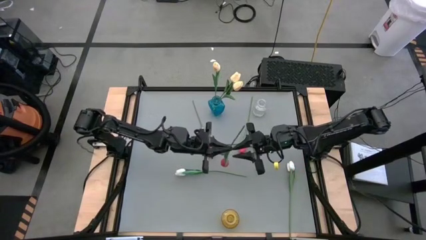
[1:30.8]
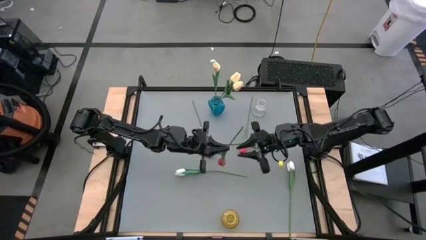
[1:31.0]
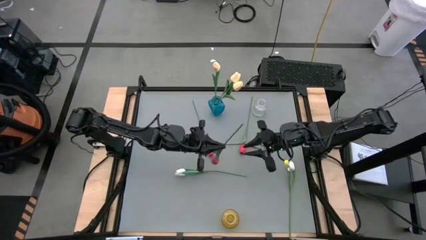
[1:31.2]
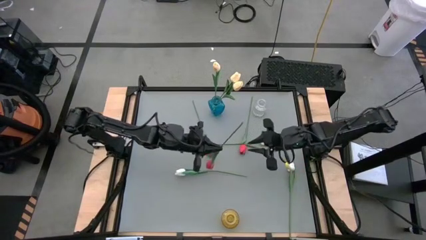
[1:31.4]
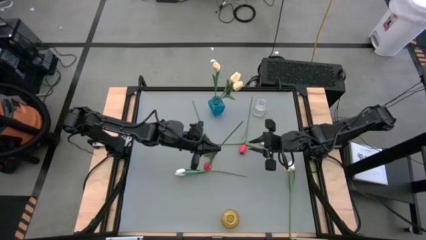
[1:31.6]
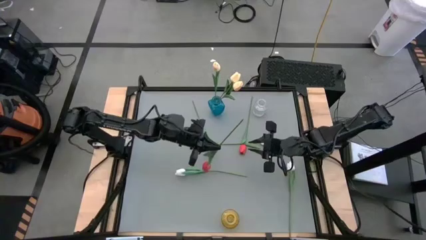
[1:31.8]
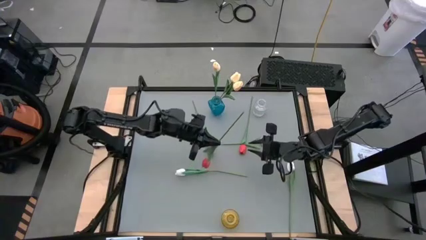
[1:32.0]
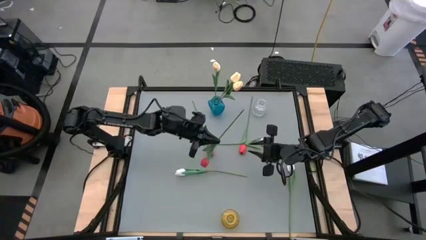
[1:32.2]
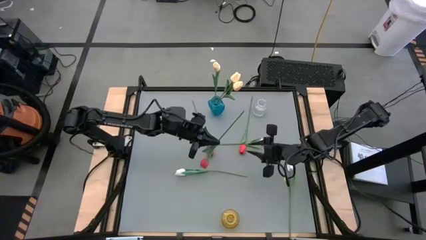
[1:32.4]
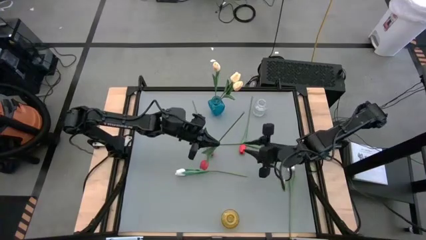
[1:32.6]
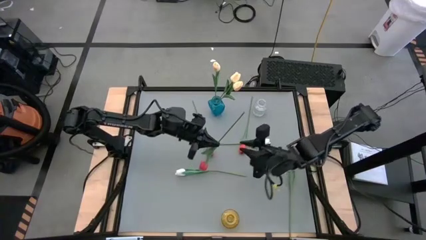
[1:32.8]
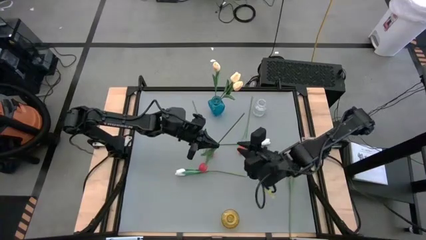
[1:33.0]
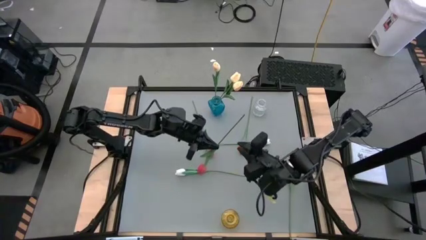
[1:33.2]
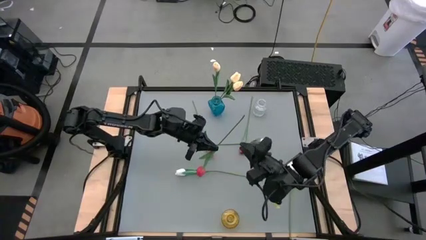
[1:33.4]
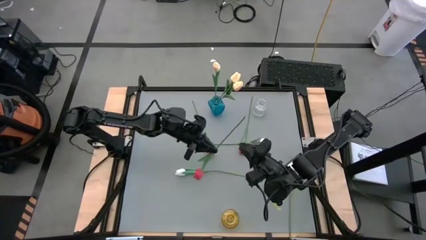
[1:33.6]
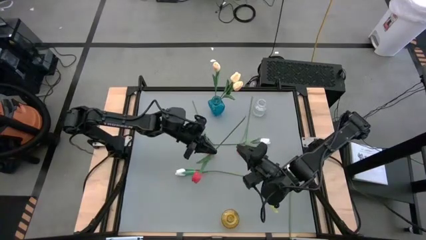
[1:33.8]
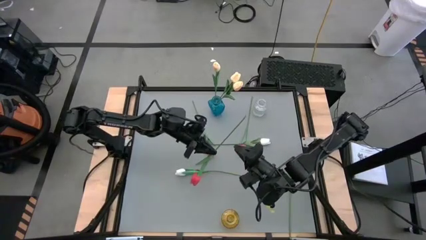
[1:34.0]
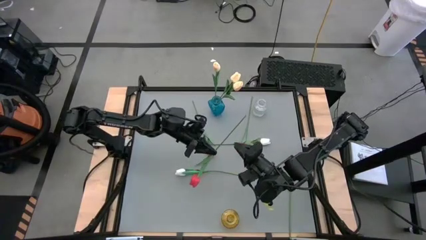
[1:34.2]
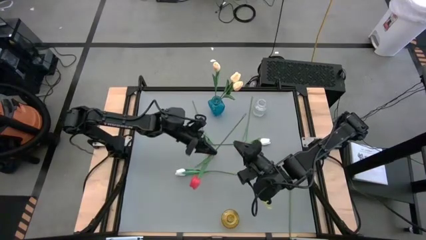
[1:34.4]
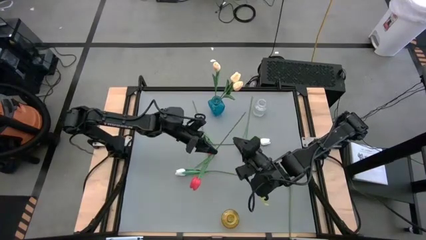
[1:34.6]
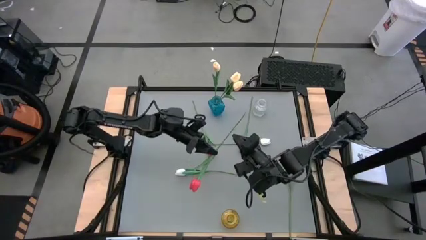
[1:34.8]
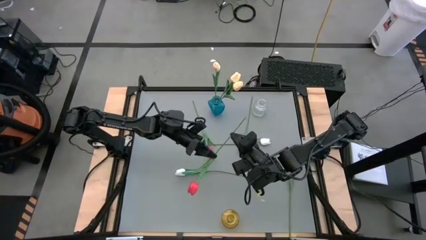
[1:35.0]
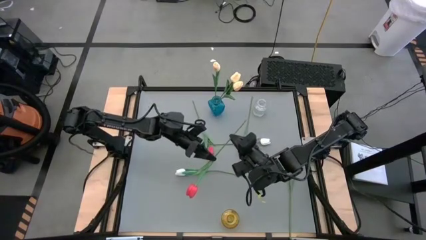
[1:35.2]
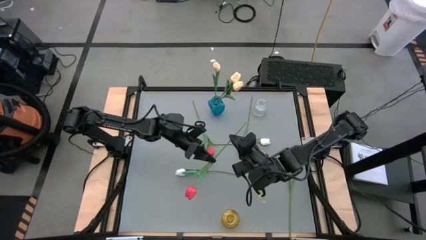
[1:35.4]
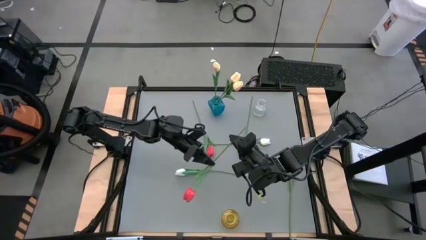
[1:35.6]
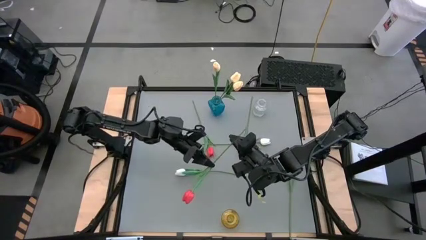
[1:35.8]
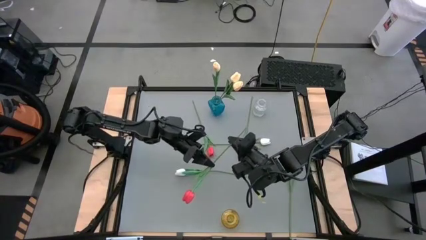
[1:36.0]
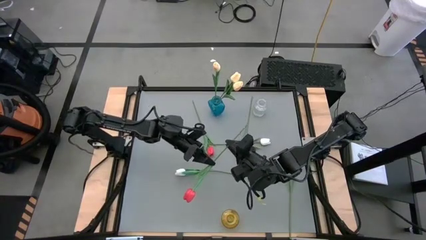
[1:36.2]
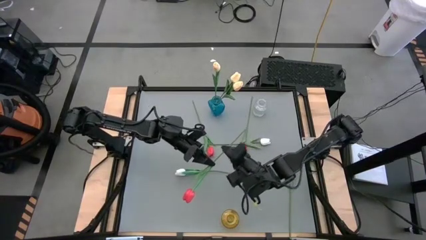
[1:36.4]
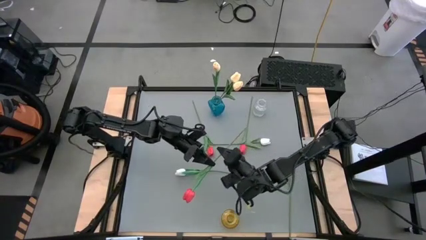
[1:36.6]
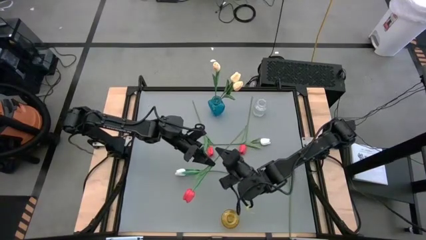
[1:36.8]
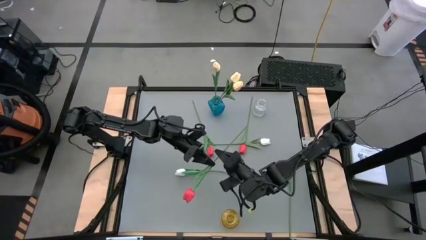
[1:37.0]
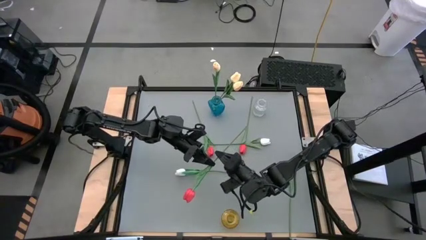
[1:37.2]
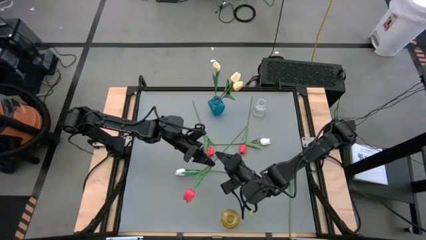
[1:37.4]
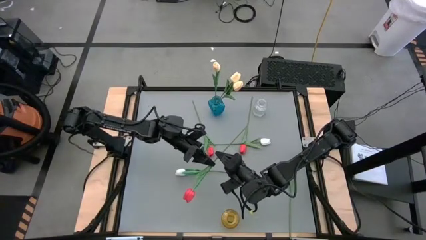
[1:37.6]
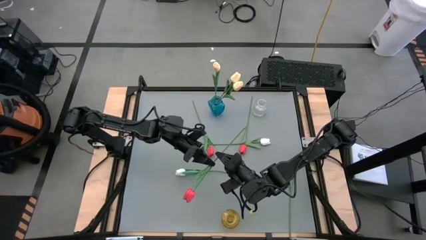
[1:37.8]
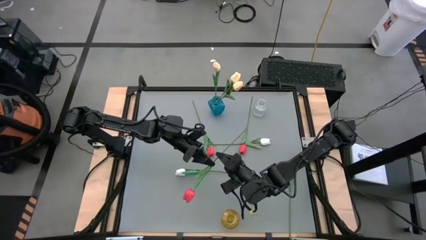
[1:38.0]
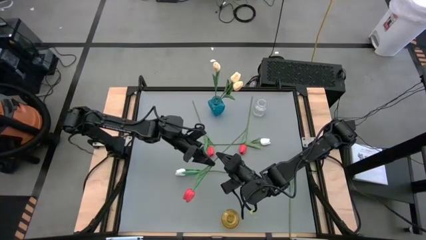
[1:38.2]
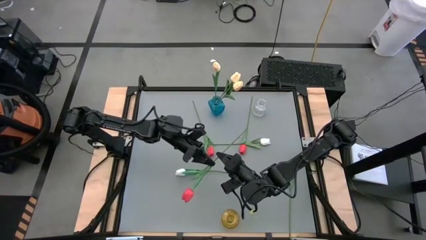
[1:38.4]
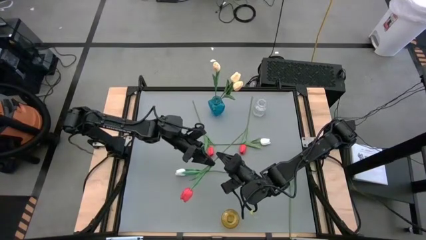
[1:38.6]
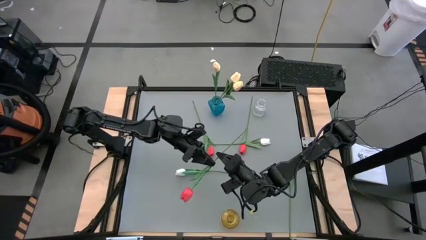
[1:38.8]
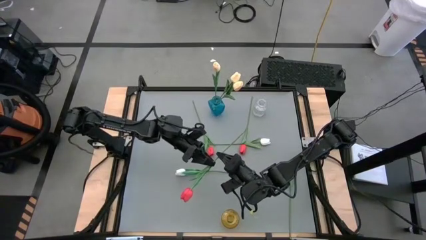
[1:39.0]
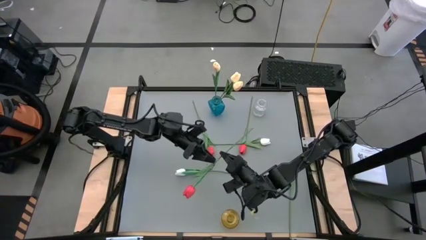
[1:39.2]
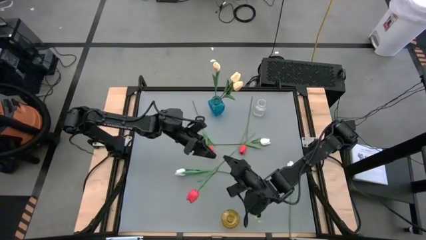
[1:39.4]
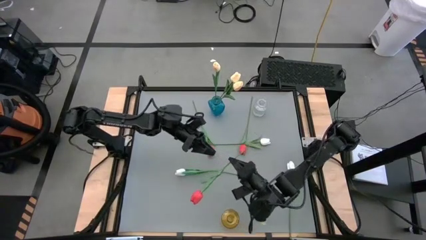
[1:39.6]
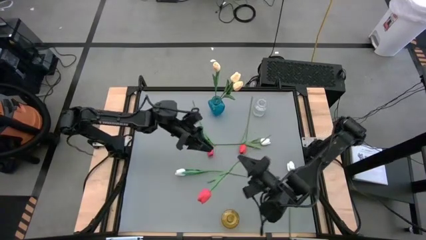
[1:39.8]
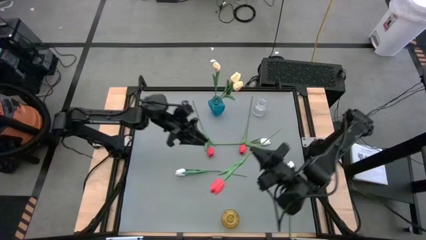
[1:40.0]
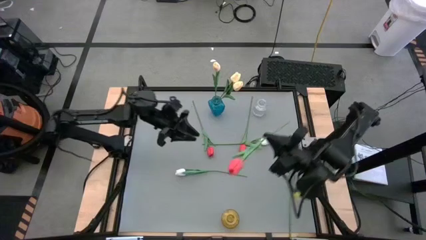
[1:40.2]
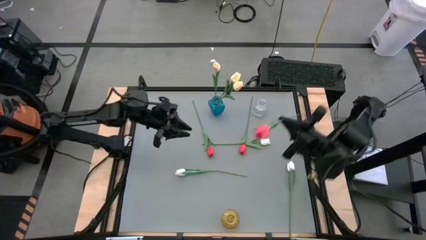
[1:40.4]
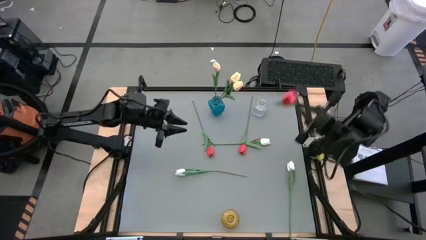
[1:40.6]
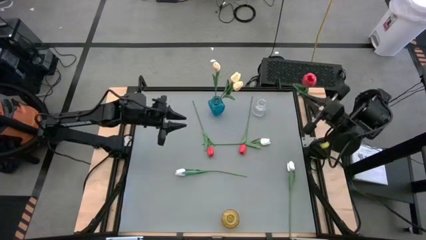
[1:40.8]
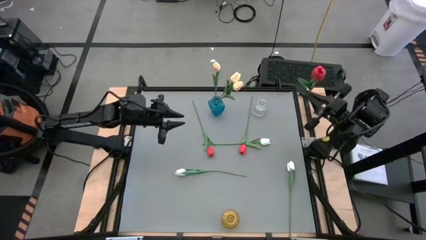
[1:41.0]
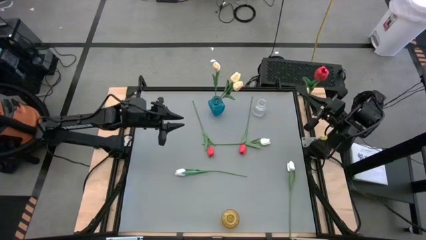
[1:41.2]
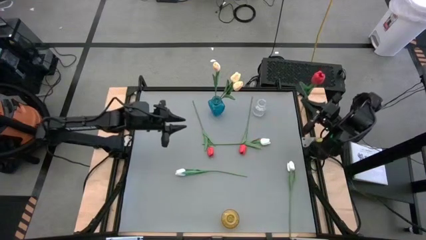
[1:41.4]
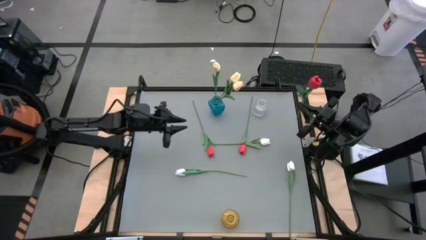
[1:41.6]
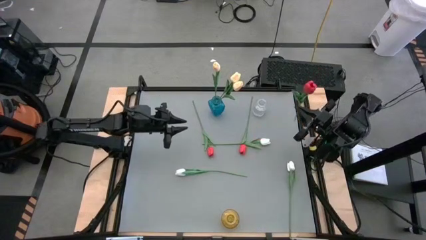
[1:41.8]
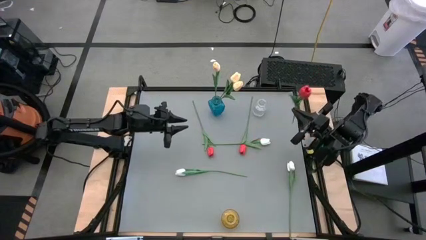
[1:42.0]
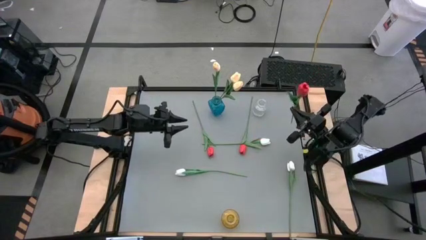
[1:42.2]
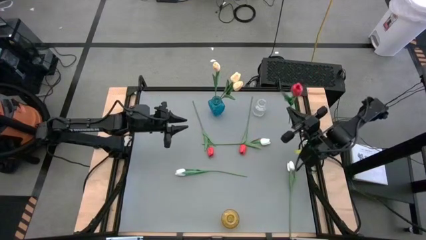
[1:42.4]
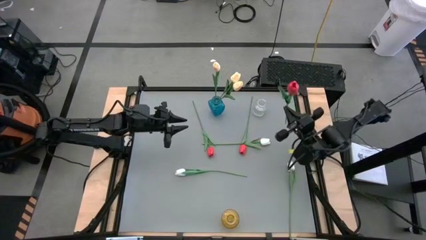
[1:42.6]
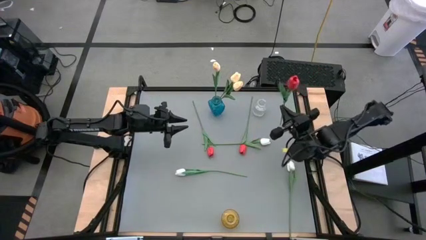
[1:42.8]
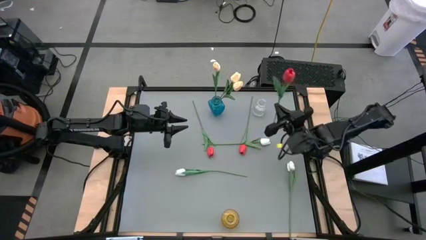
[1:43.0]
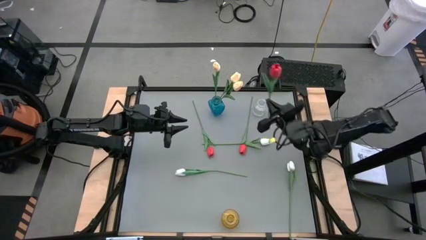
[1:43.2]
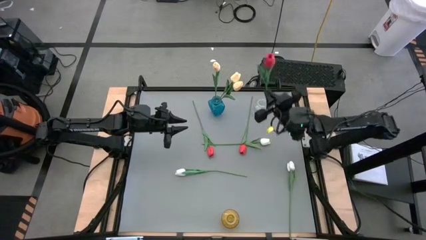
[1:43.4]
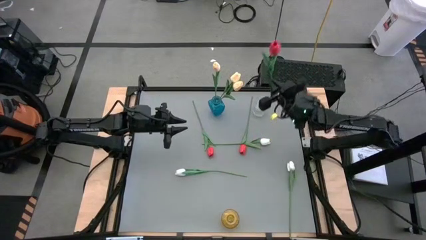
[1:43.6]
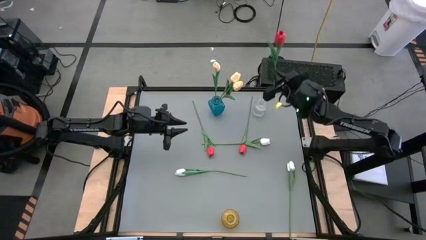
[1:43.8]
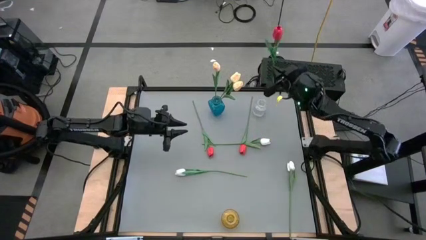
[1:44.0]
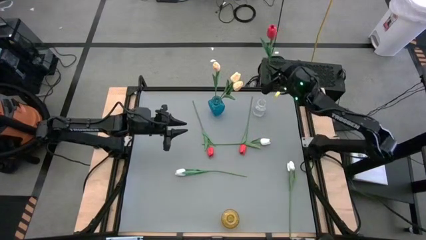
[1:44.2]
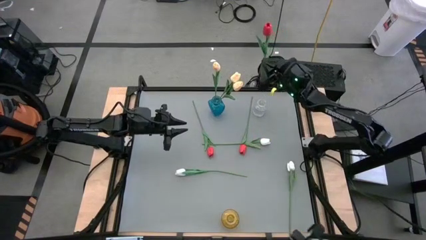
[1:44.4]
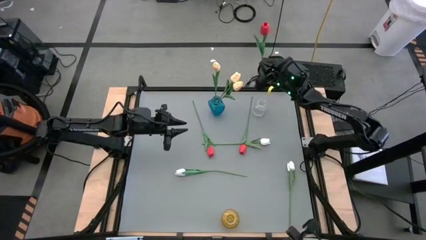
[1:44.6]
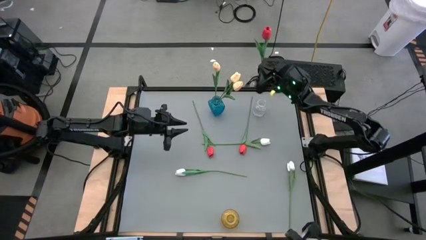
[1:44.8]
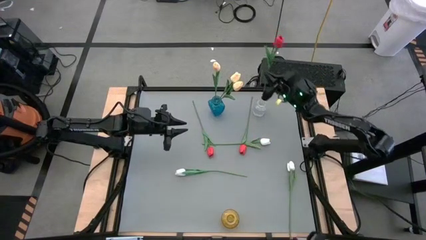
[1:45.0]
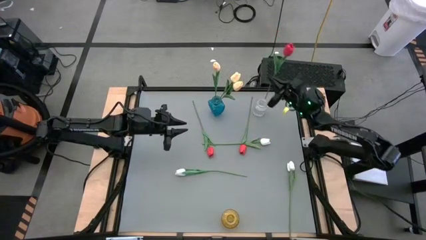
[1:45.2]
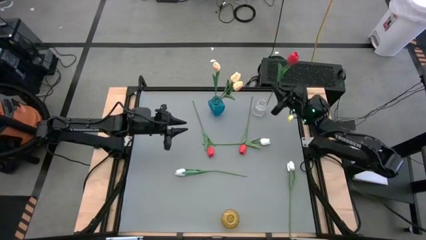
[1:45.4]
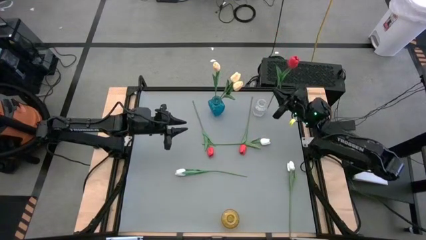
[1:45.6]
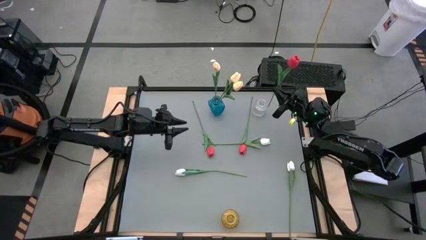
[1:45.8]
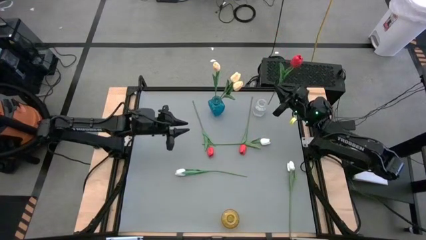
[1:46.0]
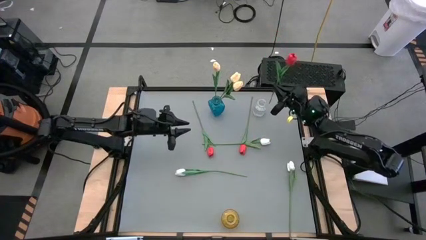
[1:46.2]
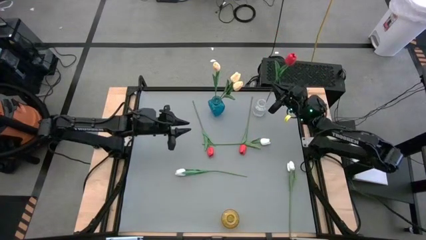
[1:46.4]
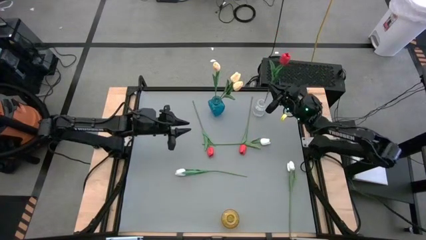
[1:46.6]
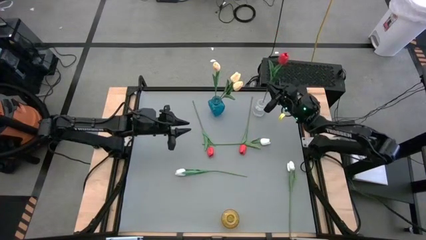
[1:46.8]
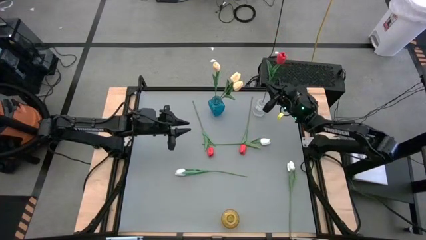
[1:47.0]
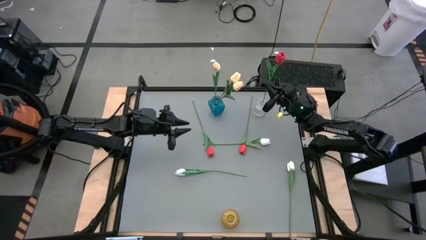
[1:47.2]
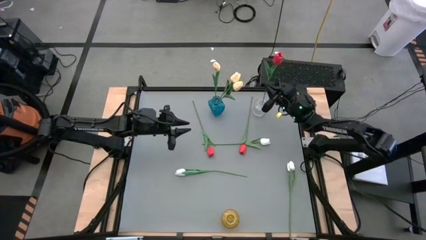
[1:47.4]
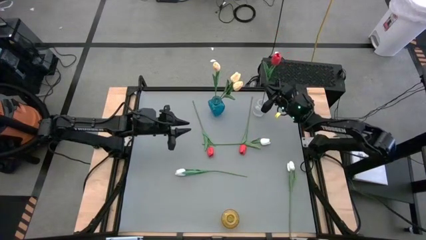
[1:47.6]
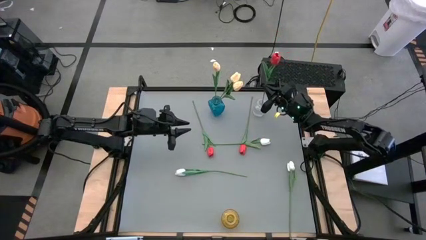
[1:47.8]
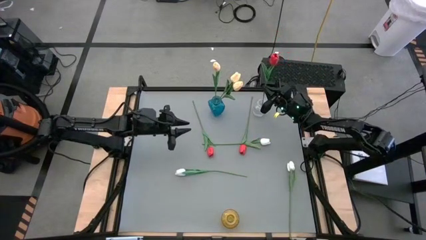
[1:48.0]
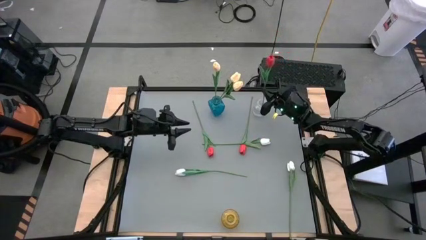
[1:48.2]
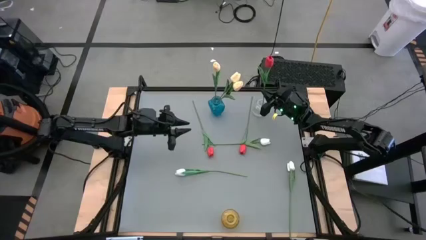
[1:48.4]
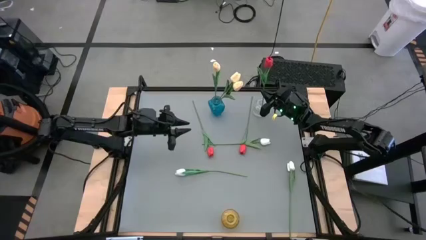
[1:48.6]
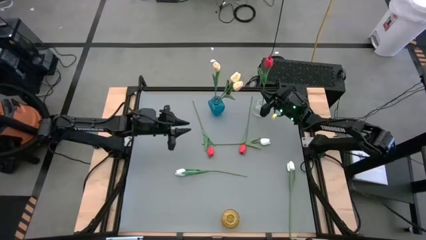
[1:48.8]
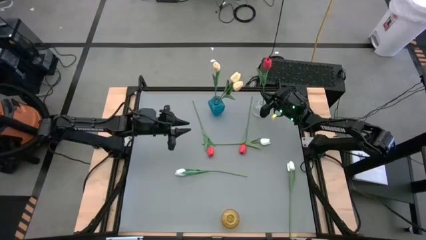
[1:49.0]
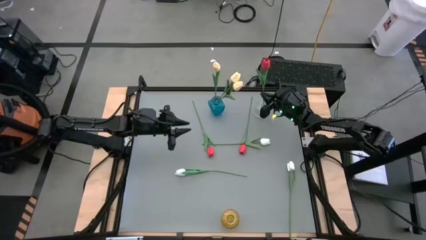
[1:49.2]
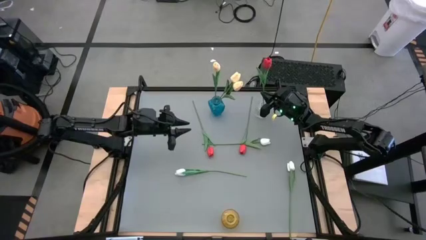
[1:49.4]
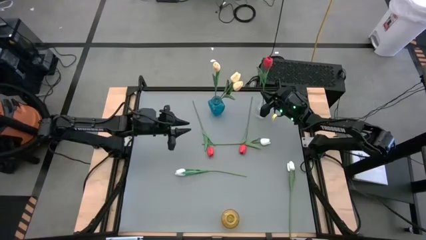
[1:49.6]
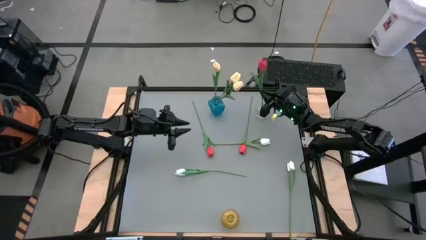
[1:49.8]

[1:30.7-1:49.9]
Task: Sort flowers into vase by color
Put the right red flower into the transparent vase
